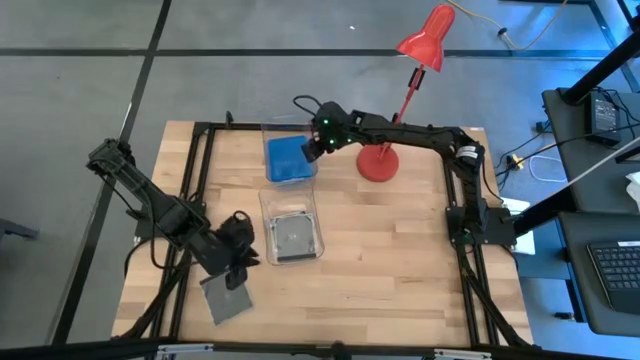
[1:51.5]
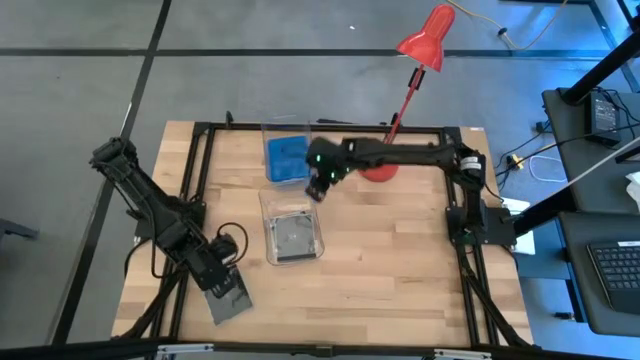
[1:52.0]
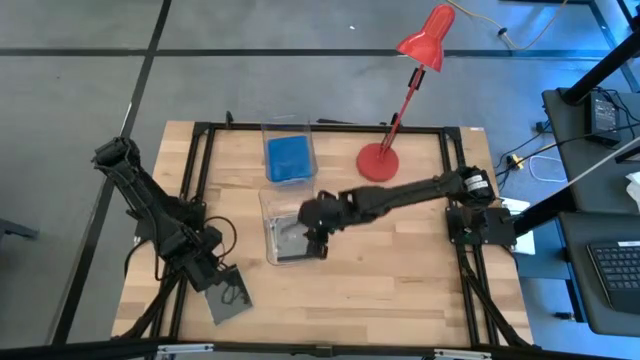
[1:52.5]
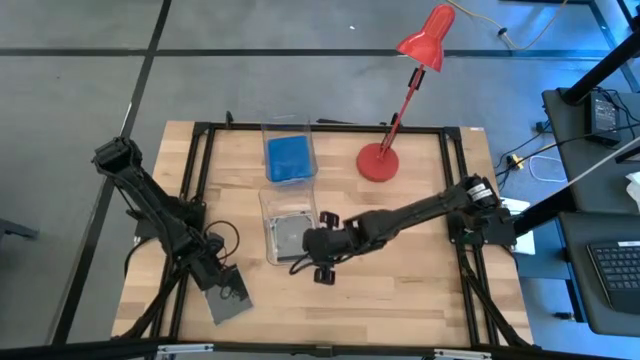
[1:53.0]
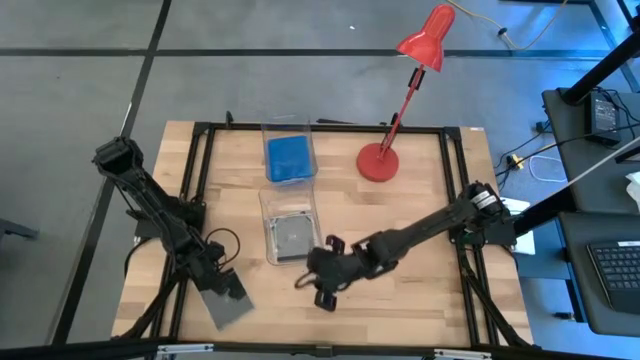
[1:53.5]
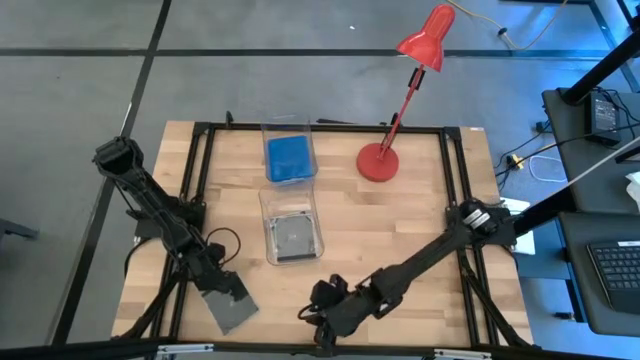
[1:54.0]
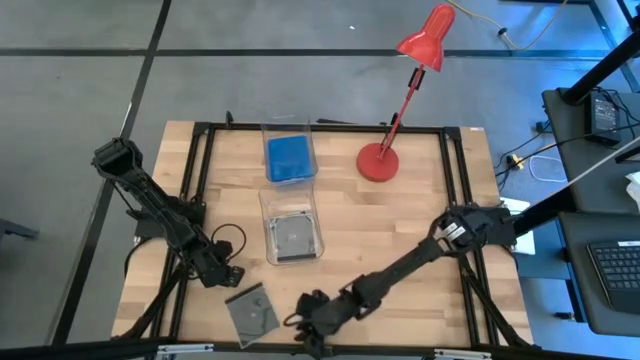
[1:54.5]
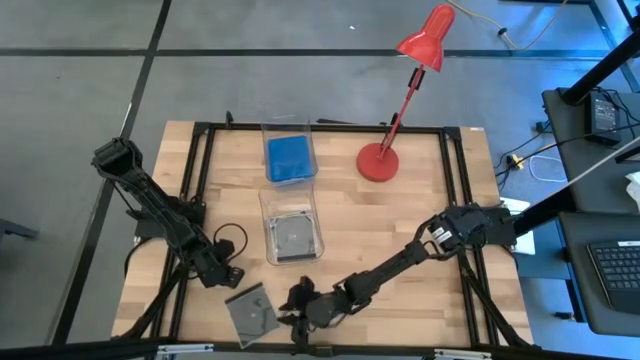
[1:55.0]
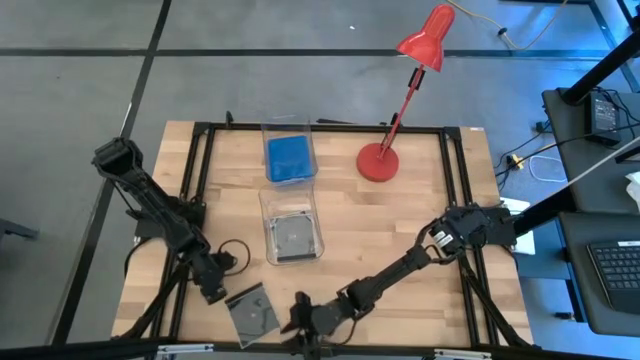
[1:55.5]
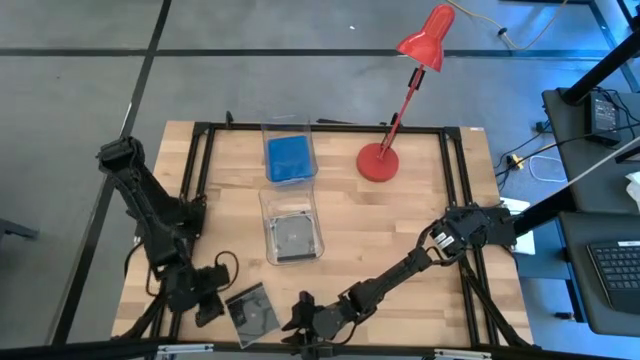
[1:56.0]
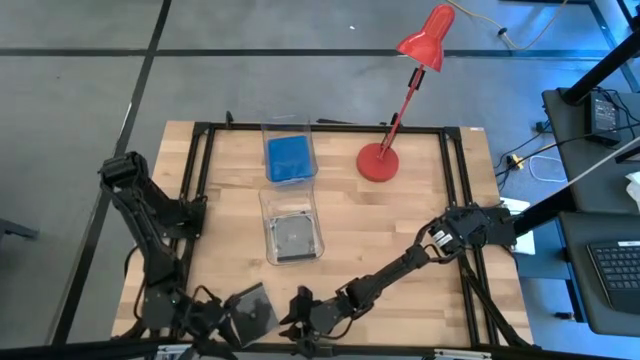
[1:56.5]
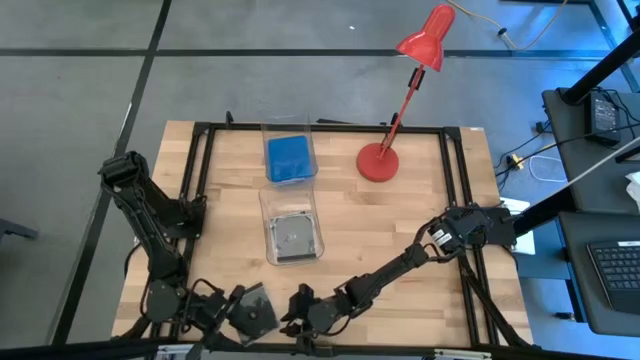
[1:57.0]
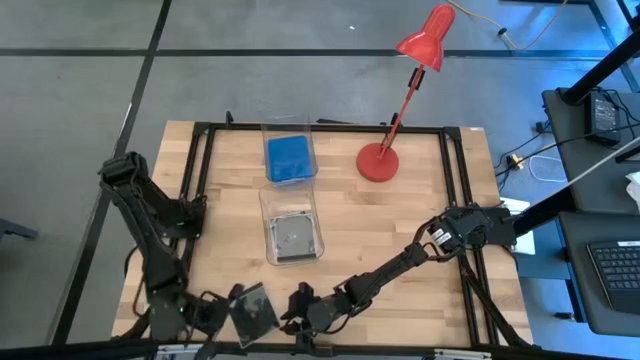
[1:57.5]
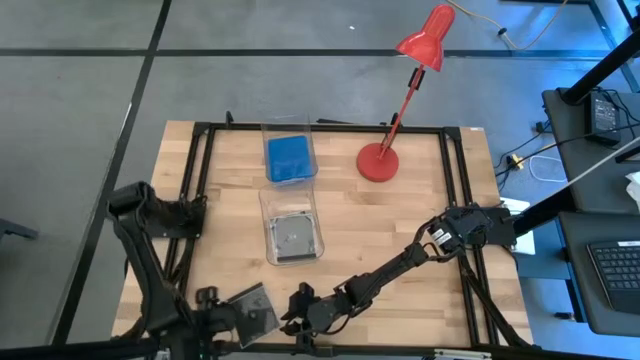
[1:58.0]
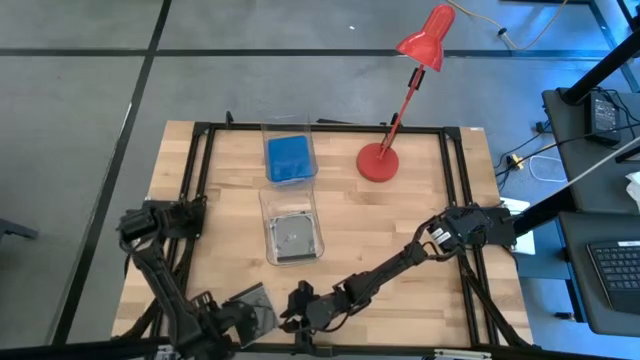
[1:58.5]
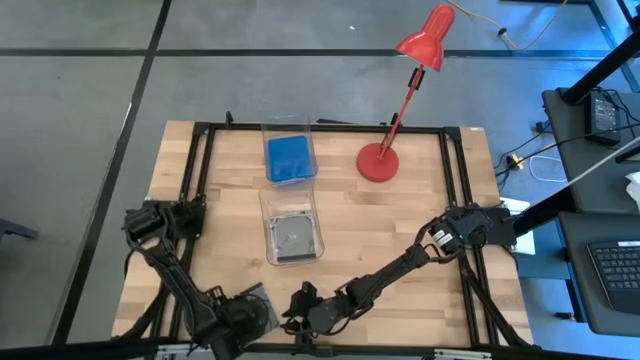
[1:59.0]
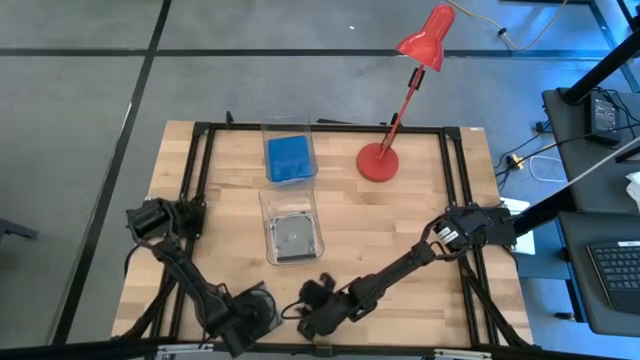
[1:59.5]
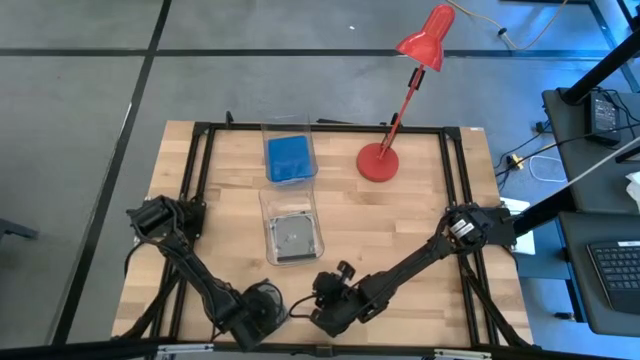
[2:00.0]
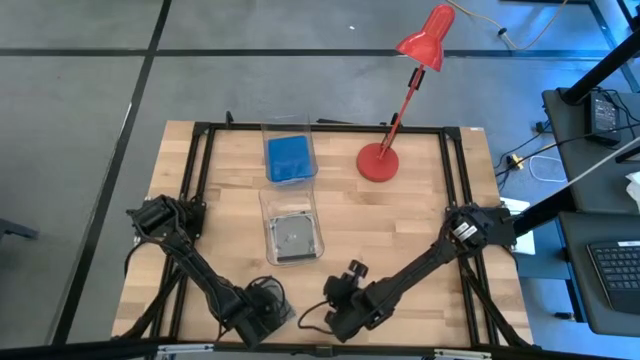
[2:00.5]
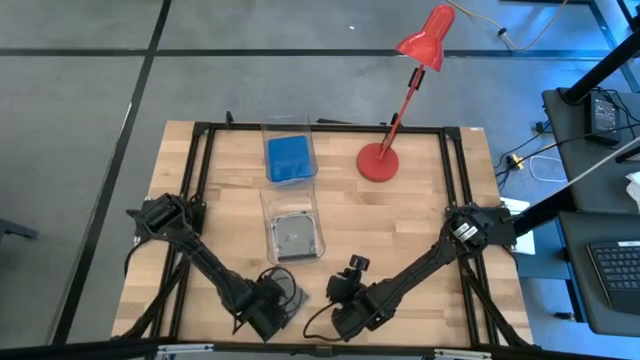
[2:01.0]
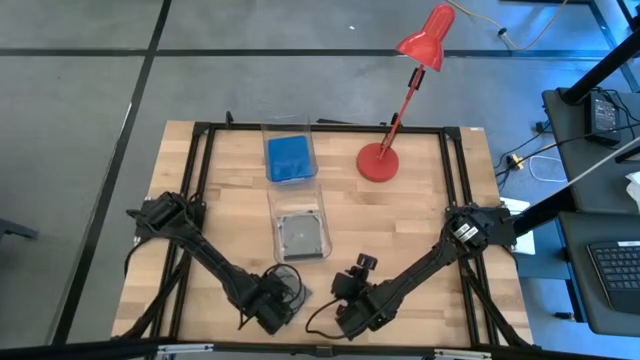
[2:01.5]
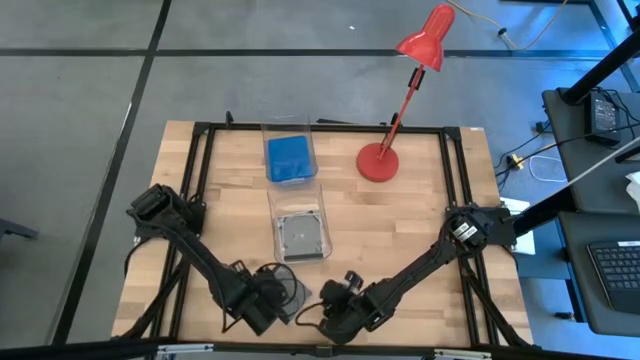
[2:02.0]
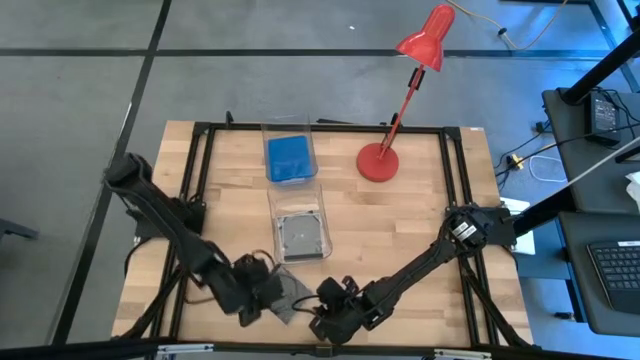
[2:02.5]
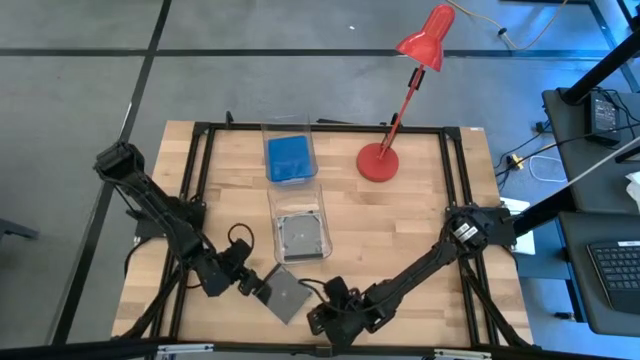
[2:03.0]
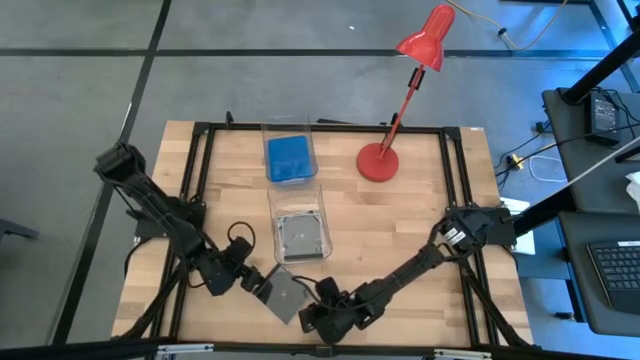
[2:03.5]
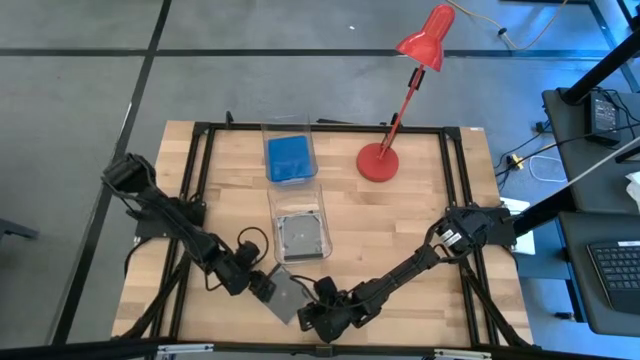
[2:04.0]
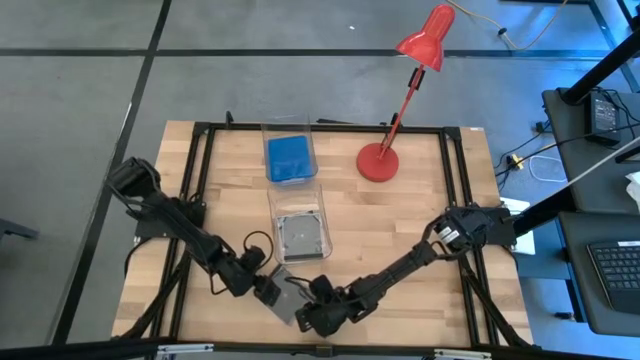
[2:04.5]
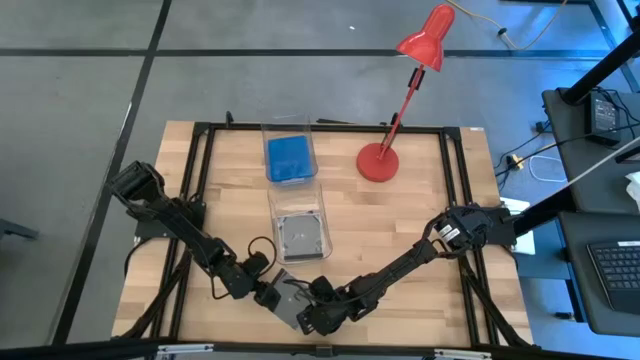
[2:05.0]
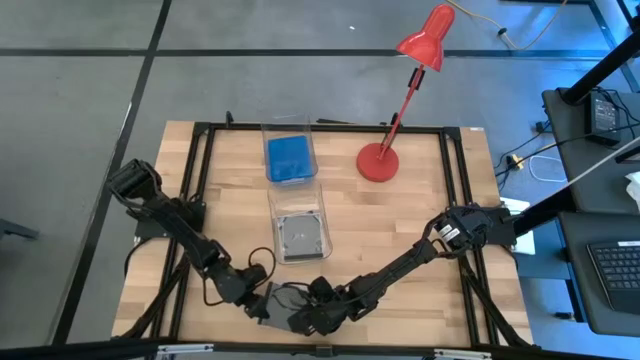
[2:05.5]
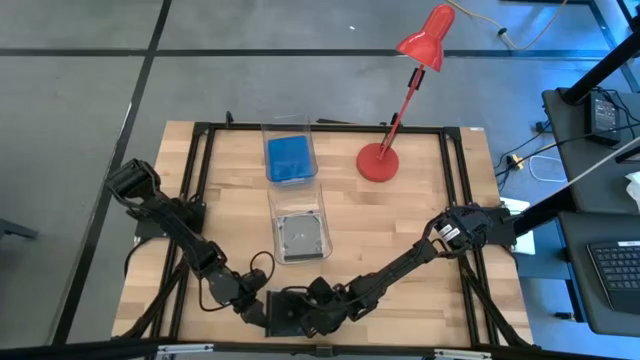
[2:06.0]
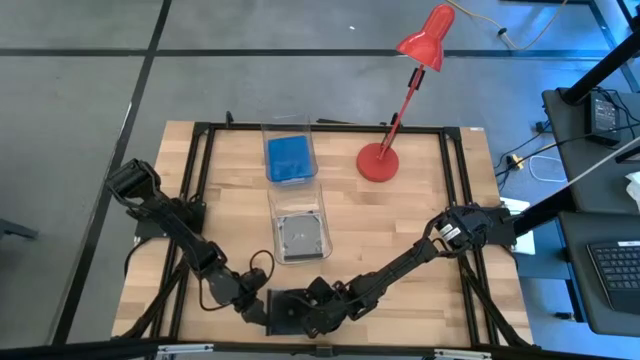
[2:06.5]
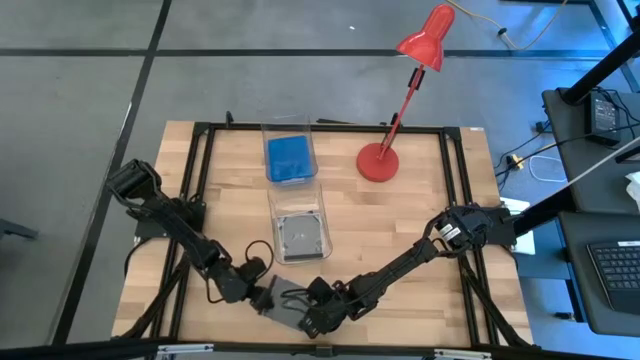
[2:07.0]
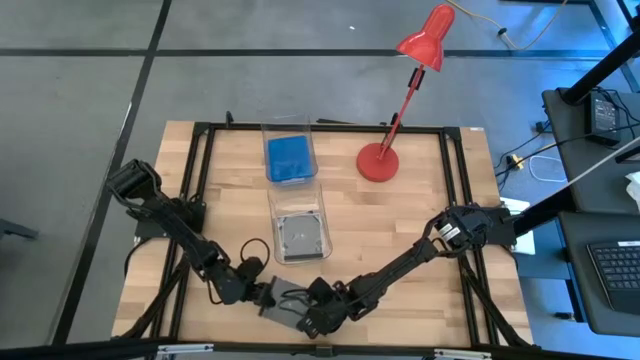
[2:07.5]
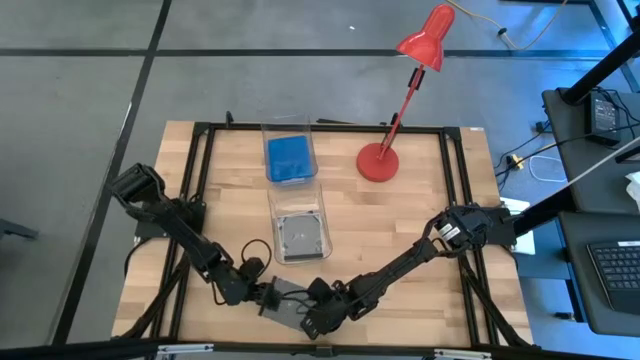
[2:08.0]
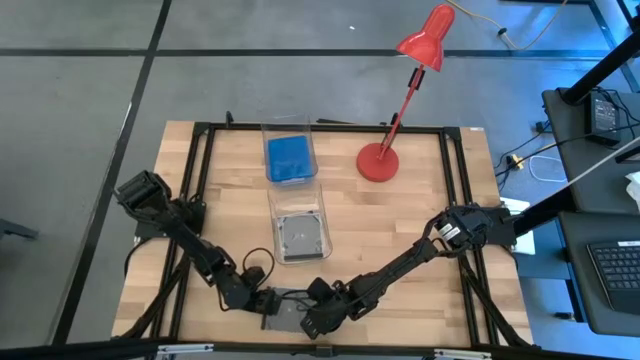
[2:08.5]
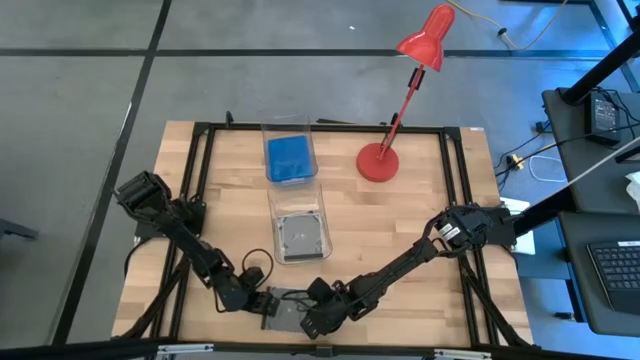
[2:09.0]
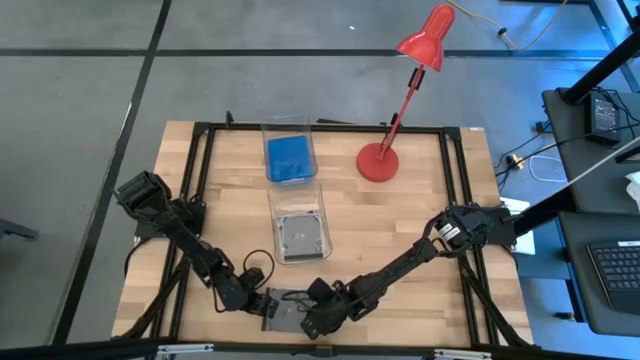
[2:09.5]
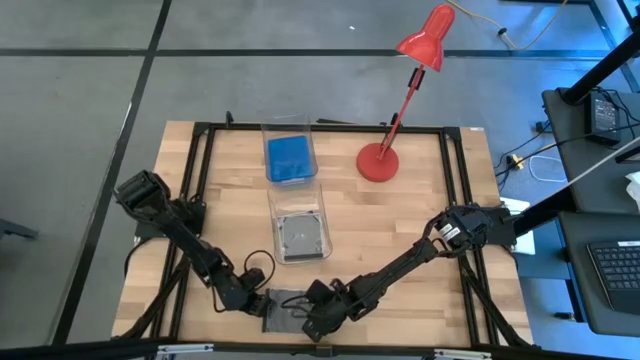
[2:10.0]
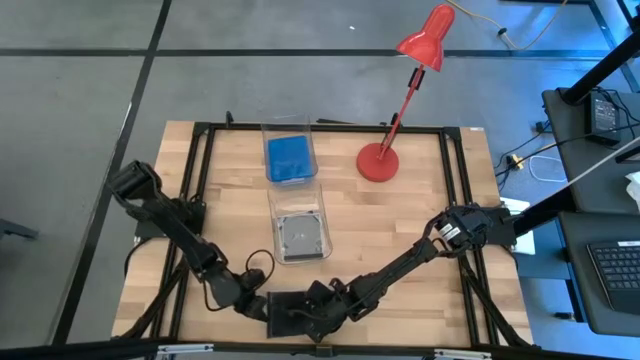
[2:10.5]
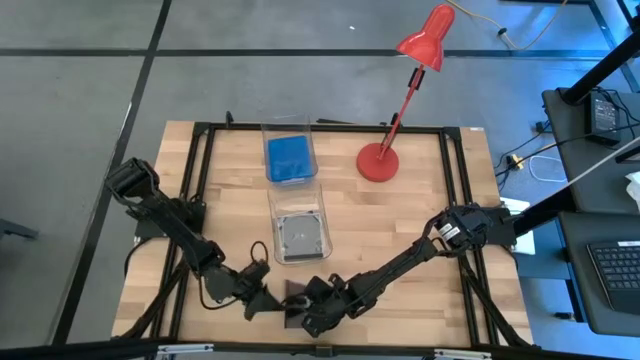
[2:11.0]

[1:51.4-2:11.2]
Task: Pick & place jewel cases by type
Put the black cd case into the bottom transparent bin

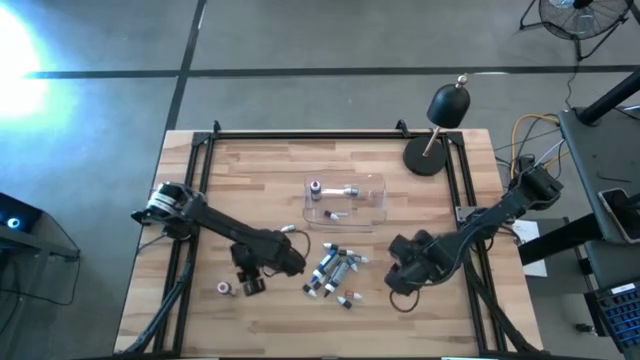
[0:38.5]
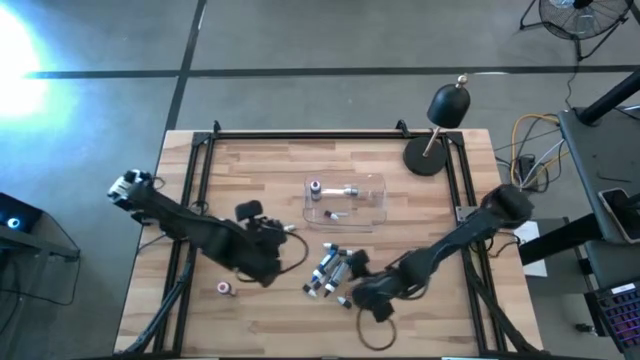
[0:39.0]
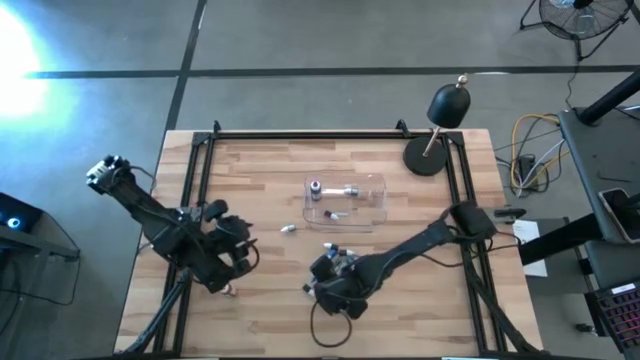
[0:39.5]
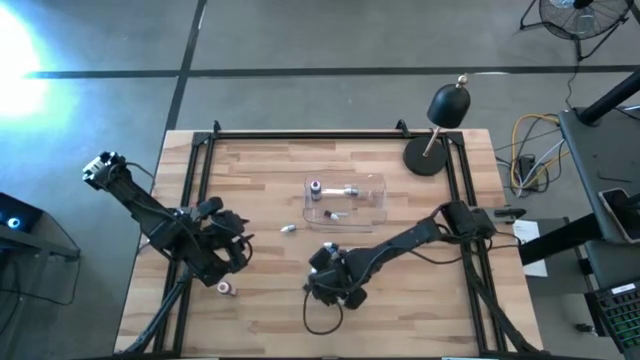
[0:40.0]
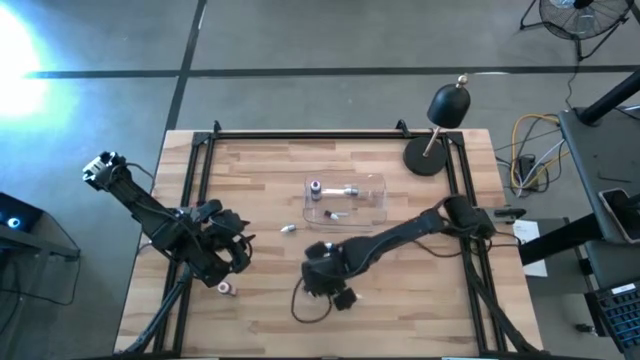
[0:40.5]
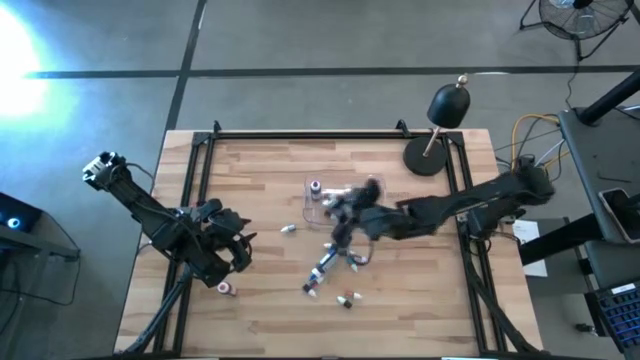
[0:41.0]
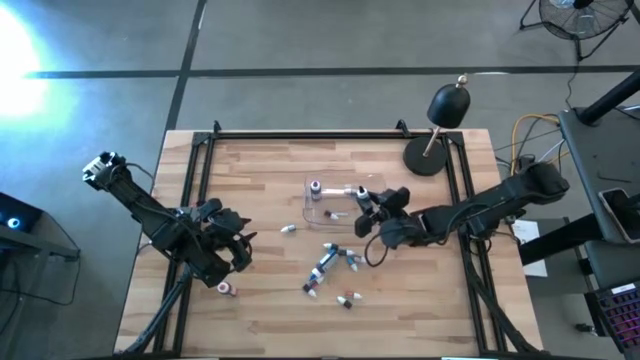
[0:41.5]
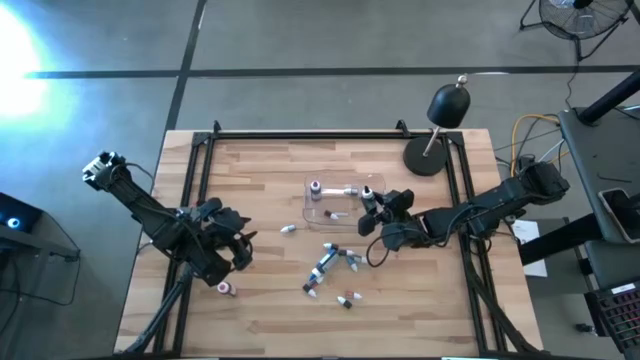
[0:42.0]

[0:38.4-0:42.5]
Task: Pick & Place food coloring
Put the large black food coloring bottle into the transparent bin
